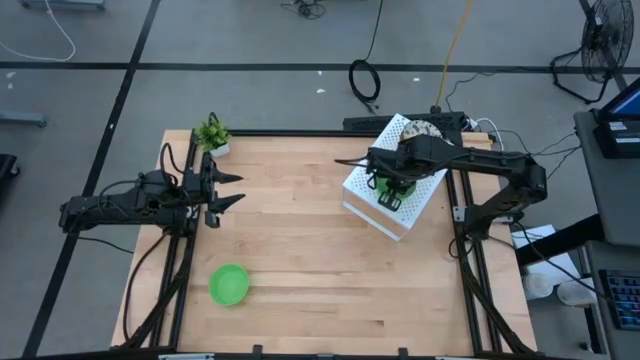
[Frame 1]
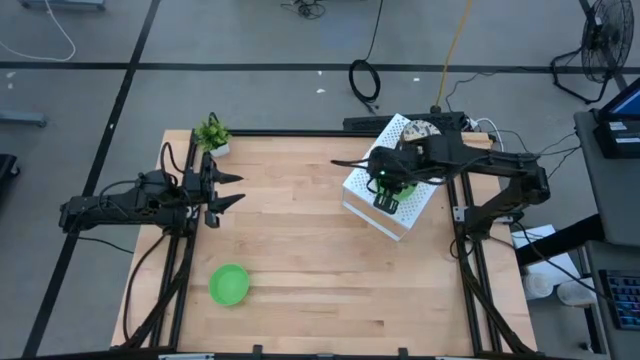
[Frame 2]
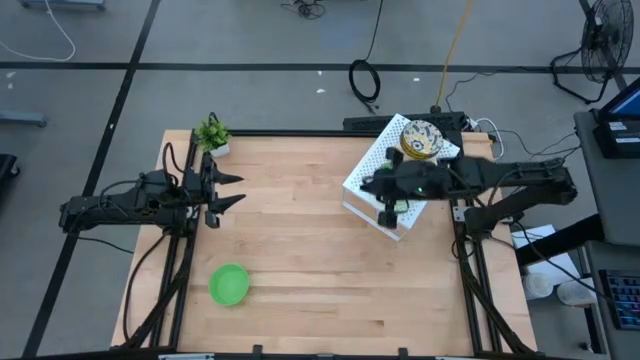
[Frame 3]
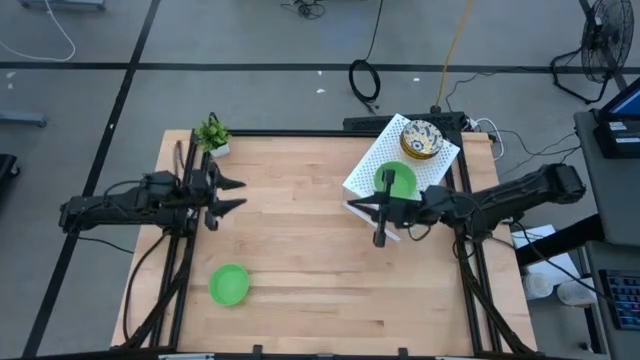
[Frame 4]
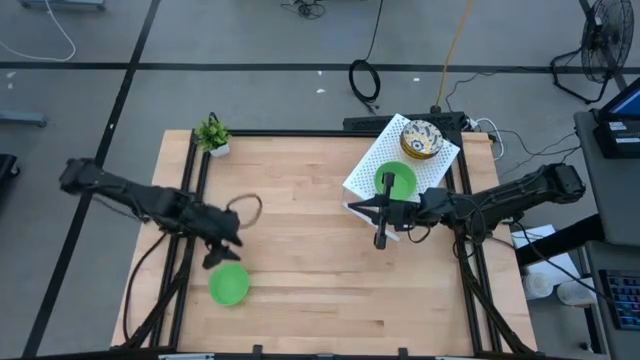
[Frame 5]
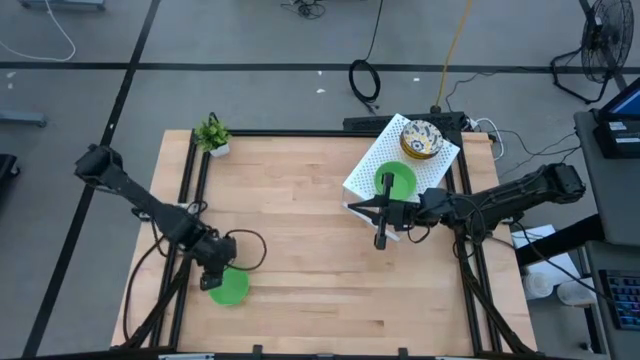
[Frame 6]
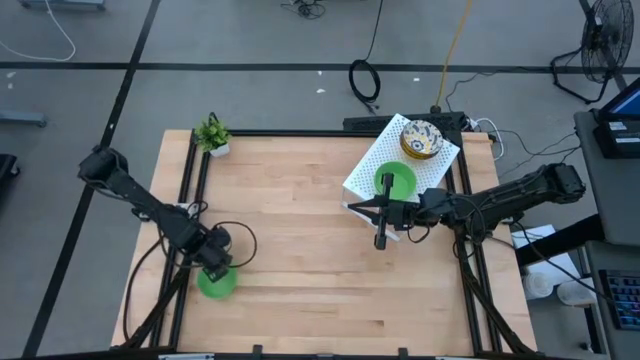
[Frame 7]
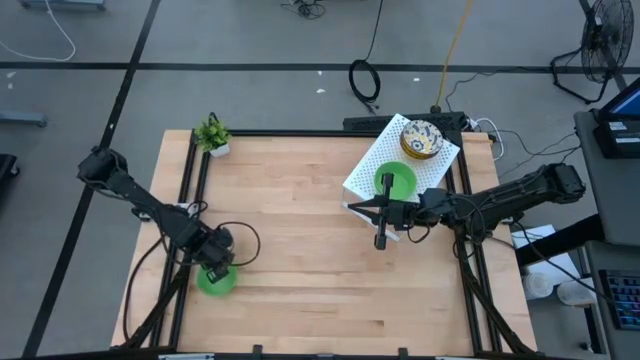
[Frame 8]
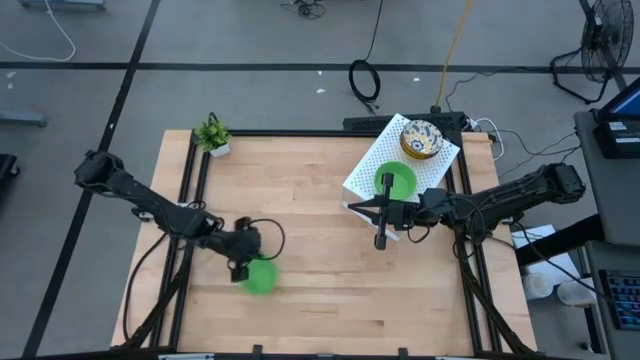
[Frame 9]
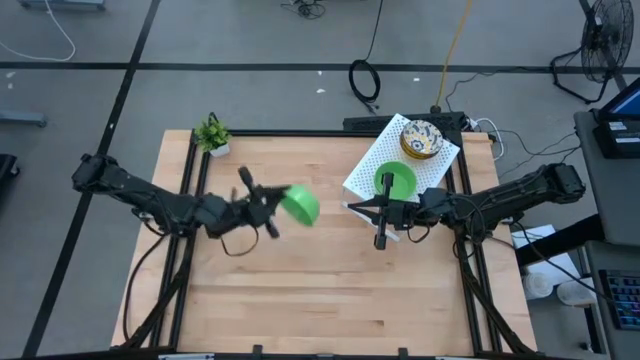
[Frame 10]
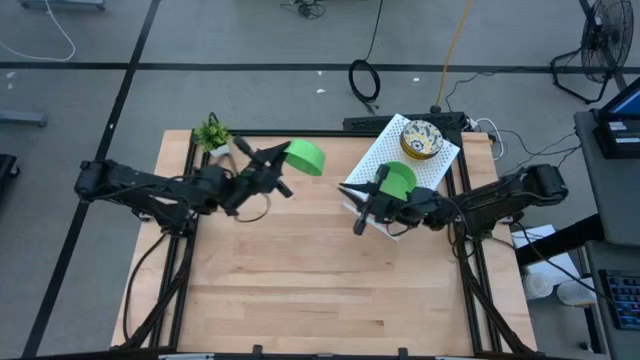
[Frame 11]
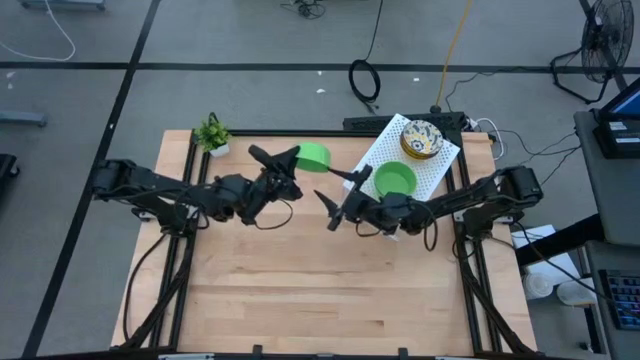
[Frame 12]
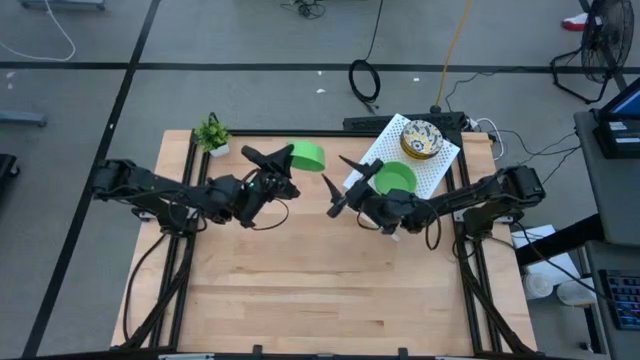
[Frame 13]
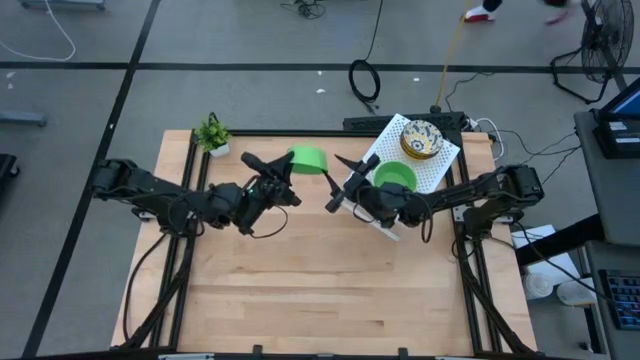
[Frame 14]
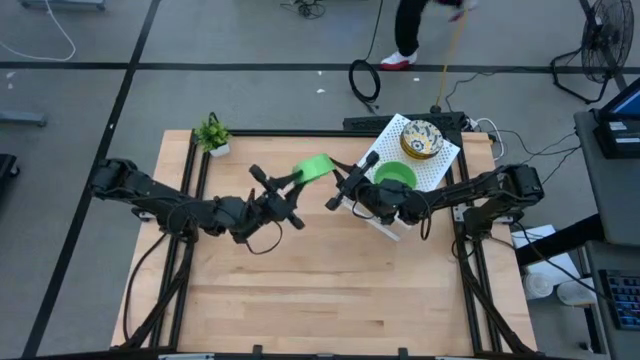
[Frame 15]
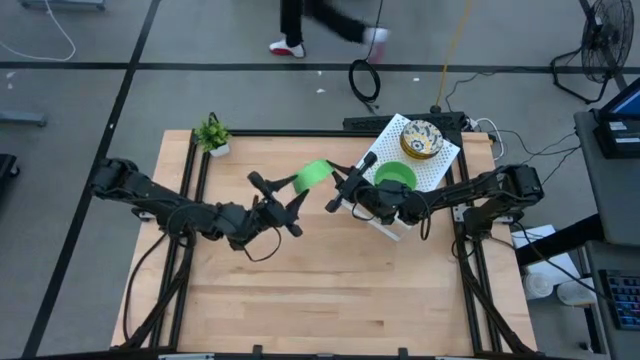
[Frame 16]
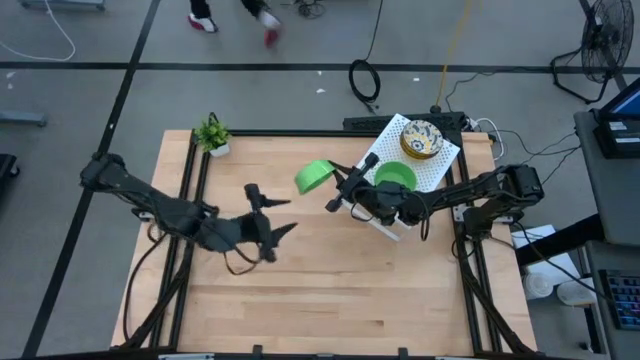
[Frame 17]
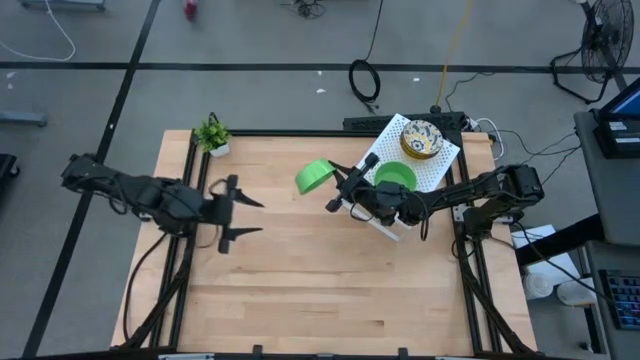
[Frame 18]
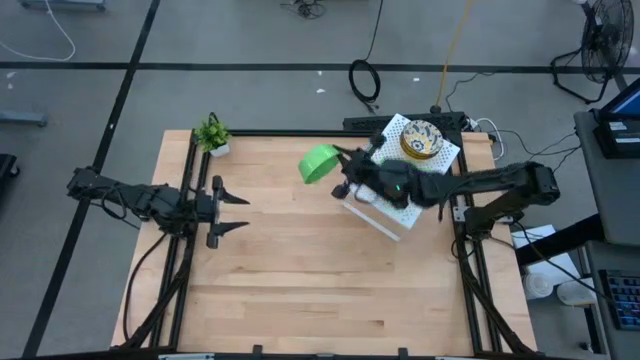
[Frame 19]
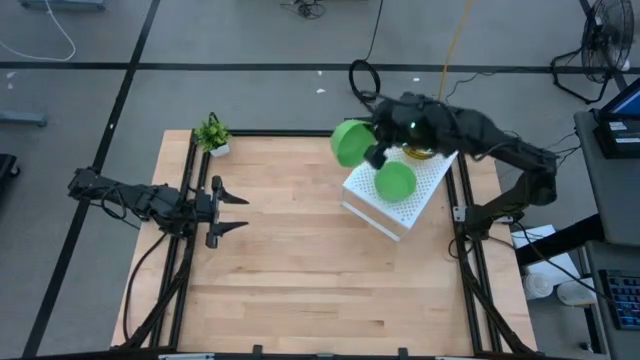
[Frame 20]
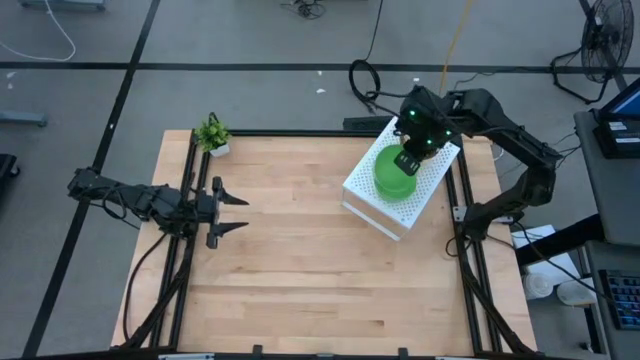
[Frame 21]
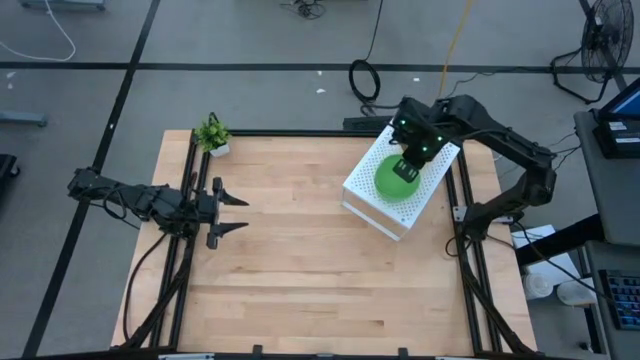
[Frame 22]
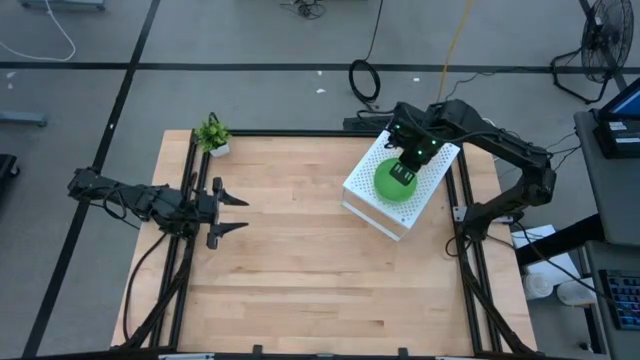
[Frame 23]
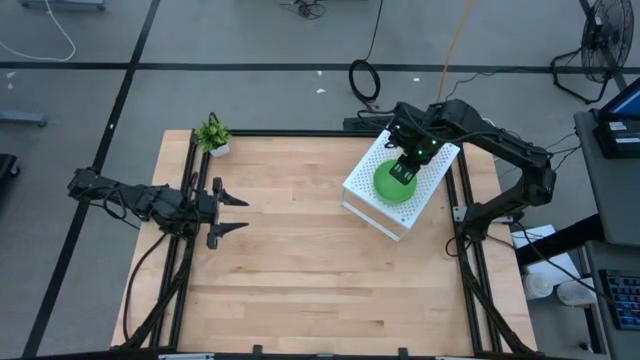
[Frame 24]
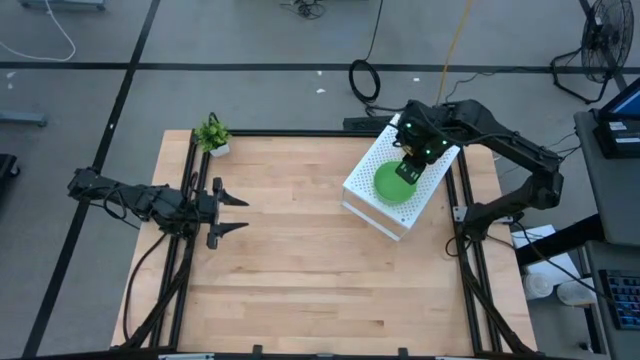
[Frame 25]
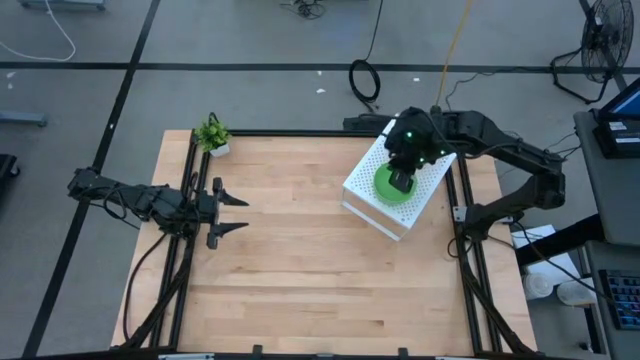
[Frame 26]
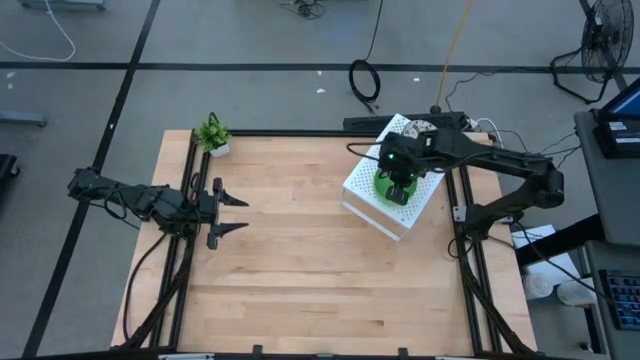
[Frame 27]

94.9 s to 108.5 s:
Task: Pick & Place Mini bowls
Stack the green bowl on top of the other green bowls on the shelf

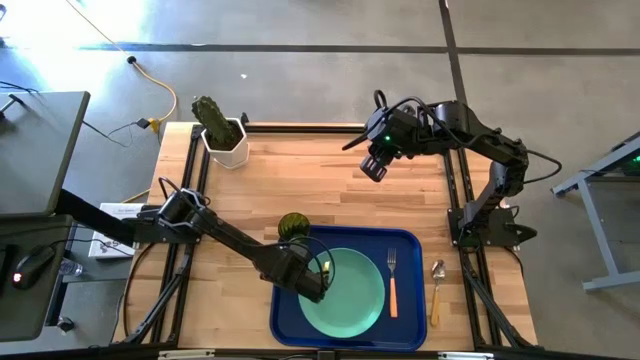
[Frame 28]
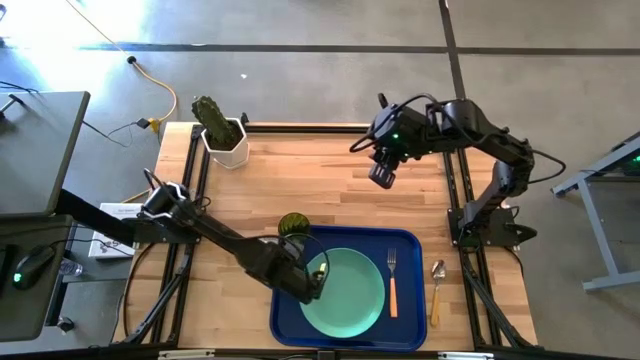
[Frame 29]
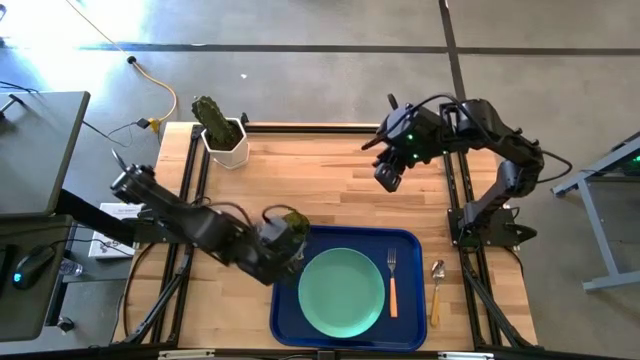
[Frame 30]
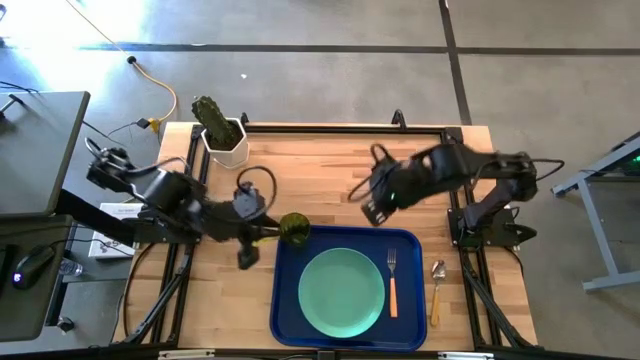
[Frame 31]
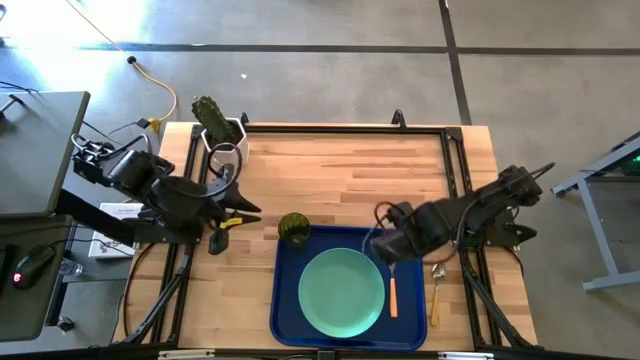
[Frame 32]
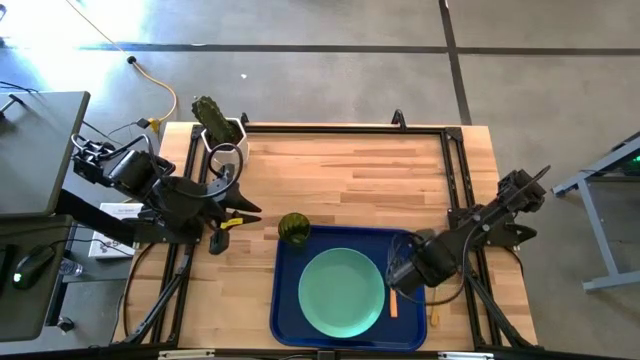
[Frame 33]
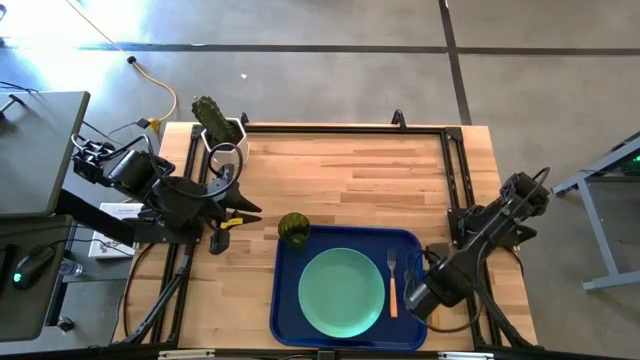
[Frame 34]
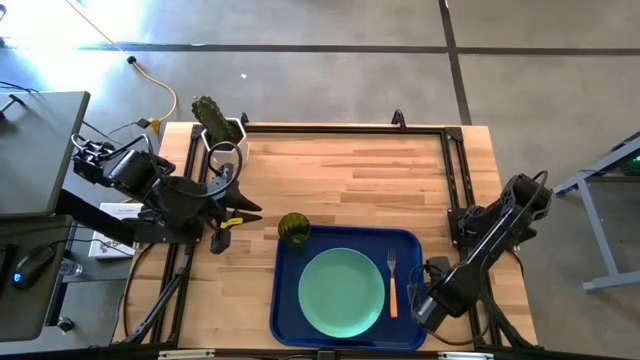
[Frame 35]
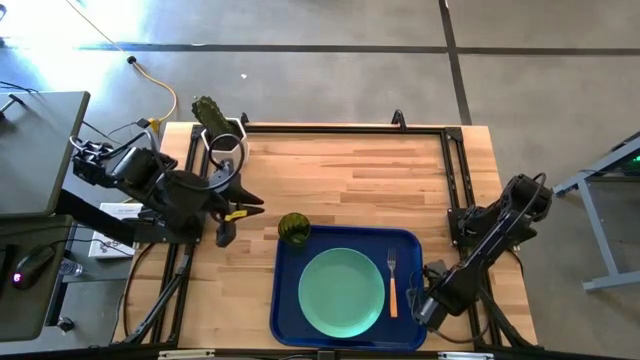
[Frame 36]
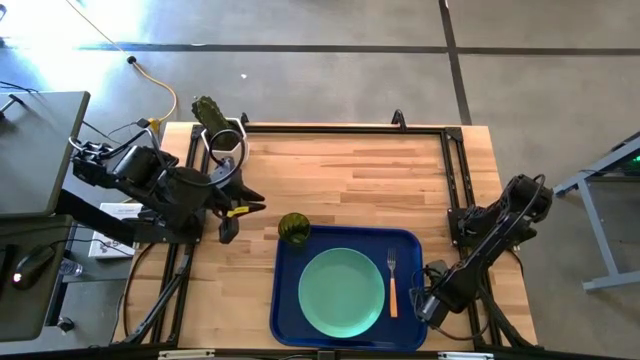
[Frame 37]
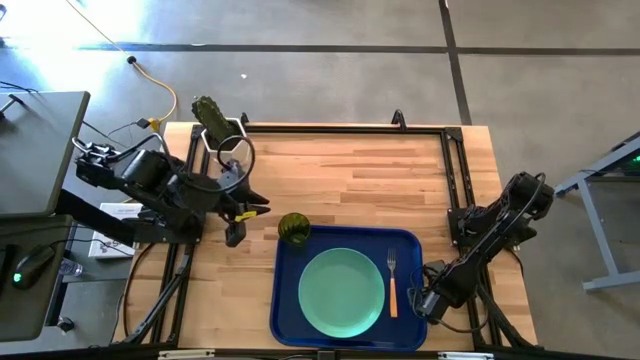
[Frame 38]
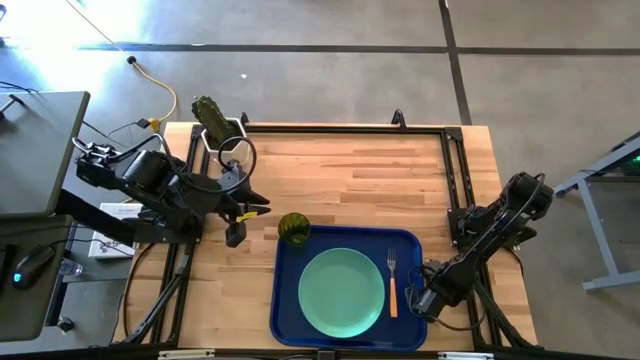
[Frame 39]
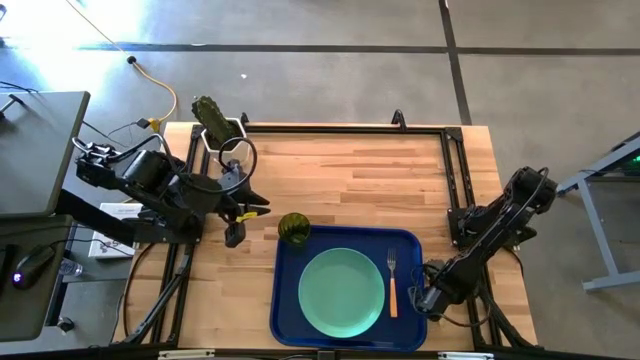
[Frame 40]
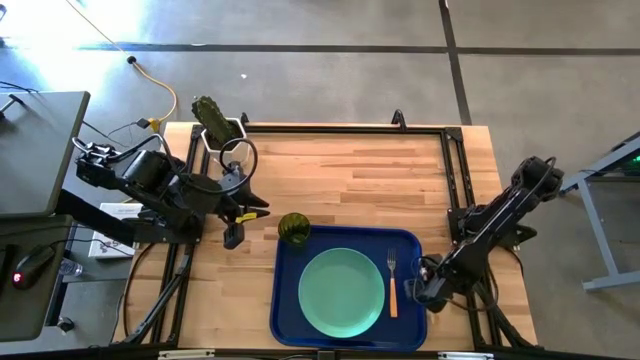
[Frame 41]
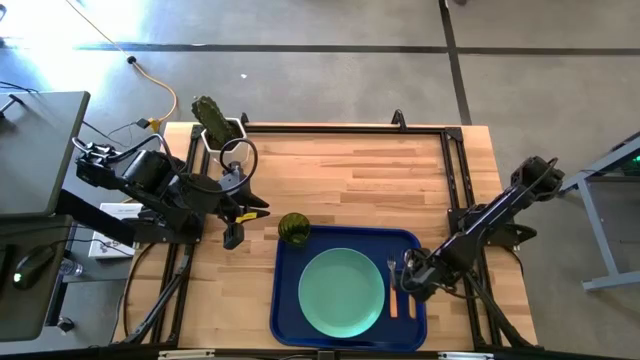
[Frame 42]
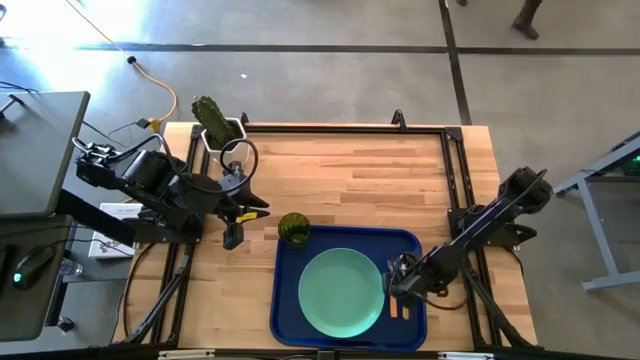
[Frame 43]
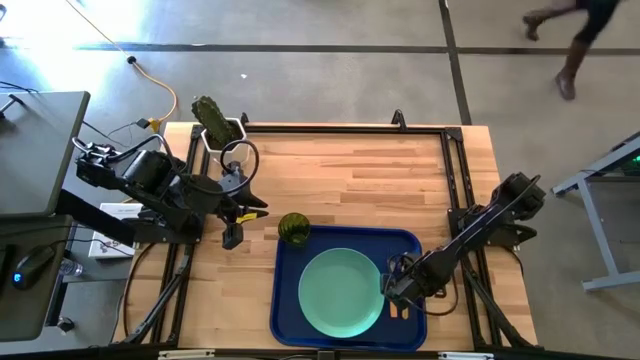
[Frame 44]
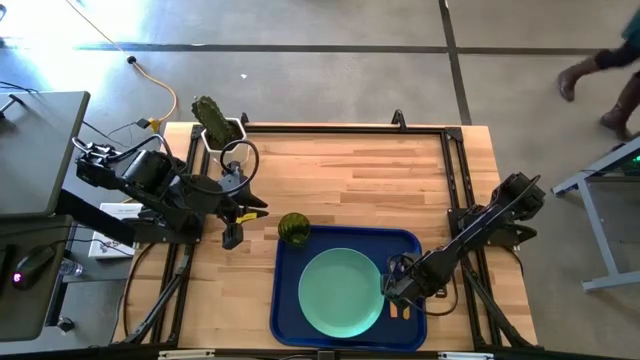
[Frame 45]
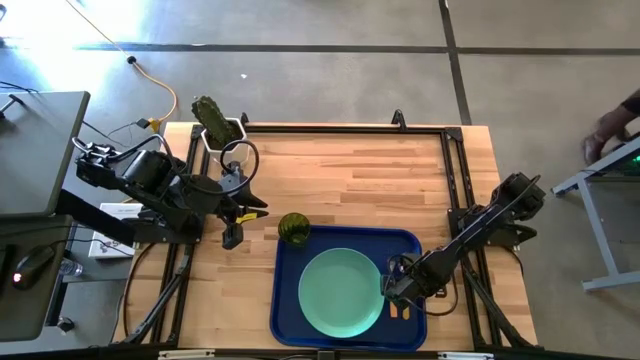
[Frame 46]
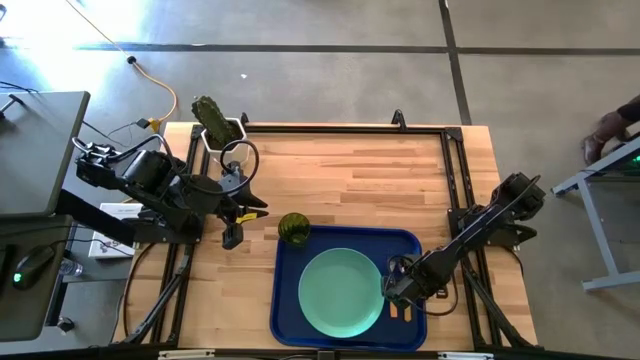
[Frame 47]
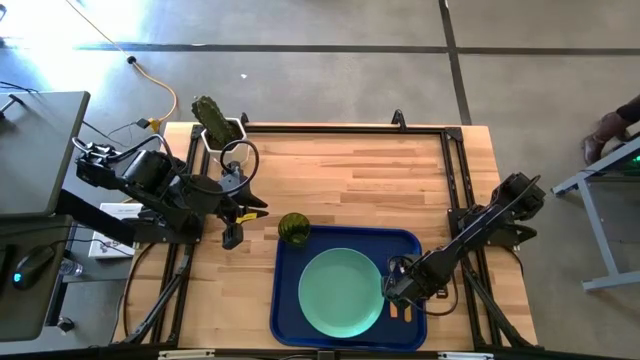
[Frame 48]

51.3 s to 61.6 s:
Task: Pick and place plate/cup/fork/spoon on tray
Put the yellow spoon to the right of the orange fork on the blue tray
